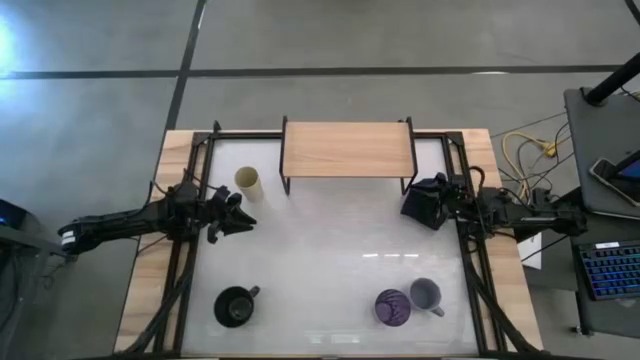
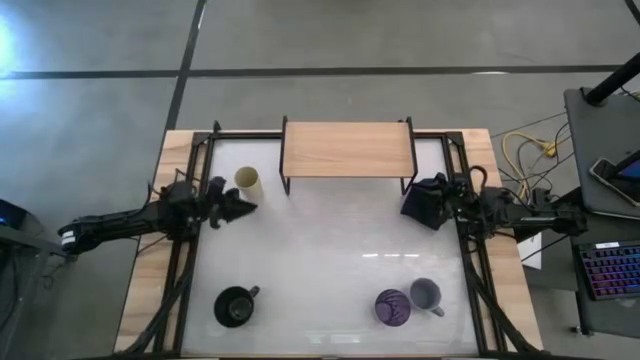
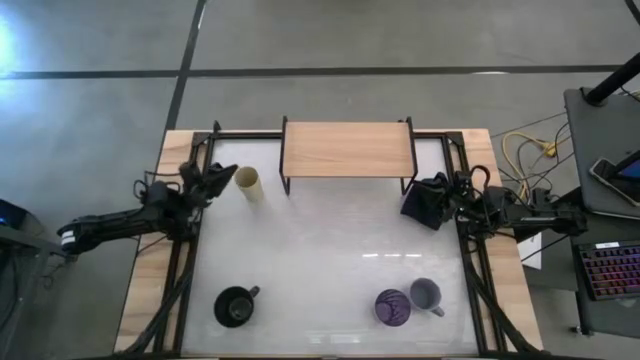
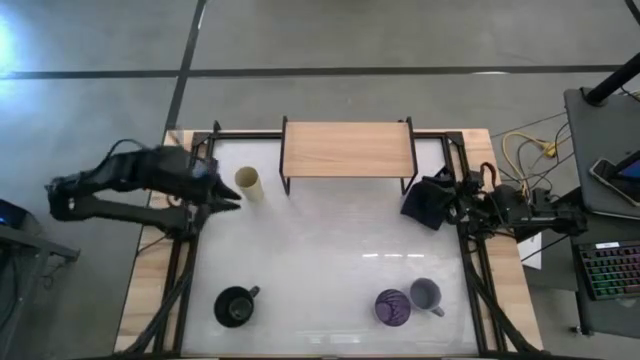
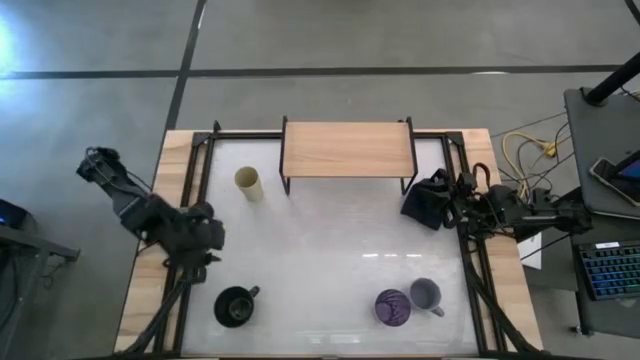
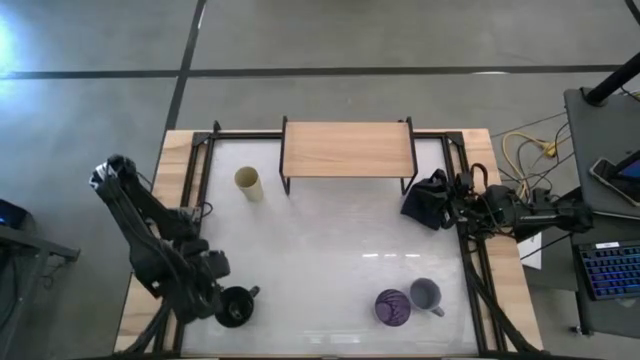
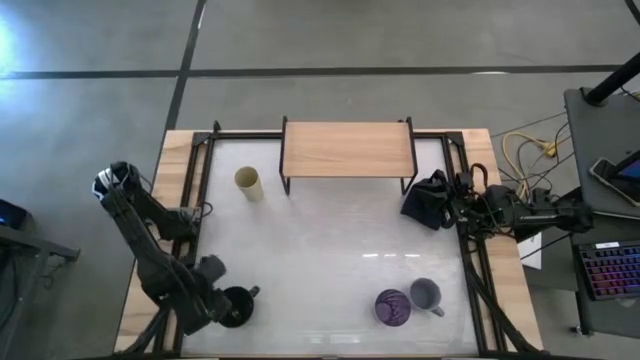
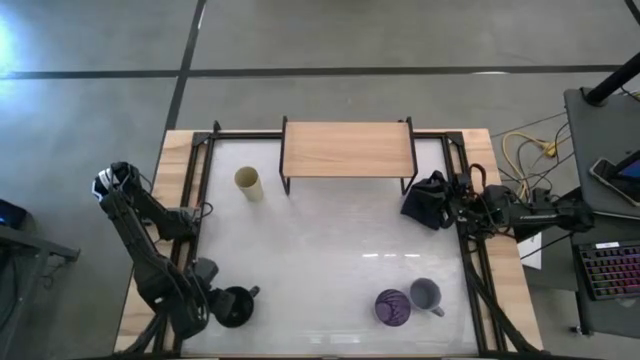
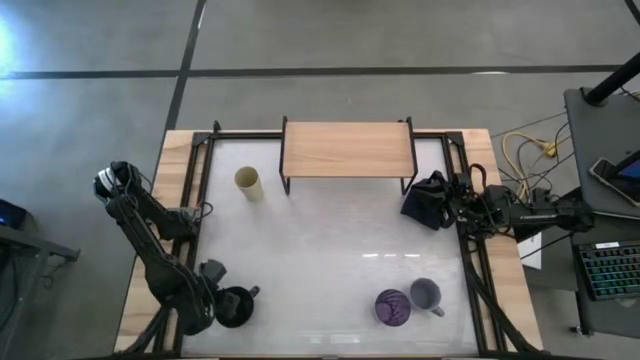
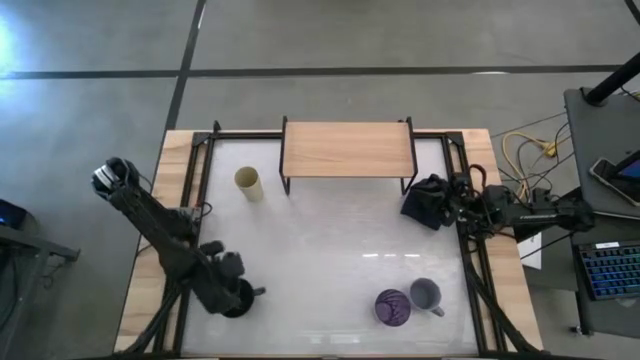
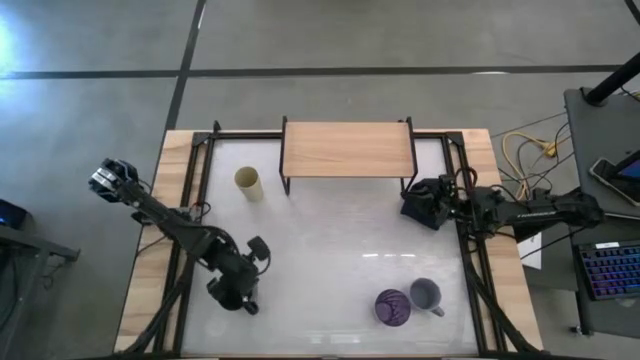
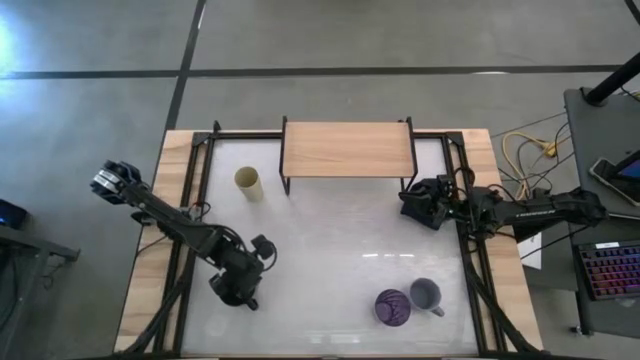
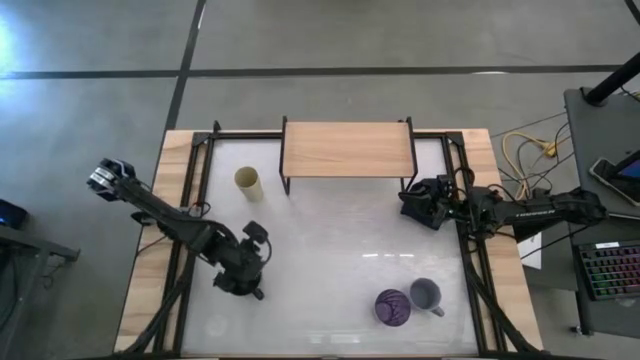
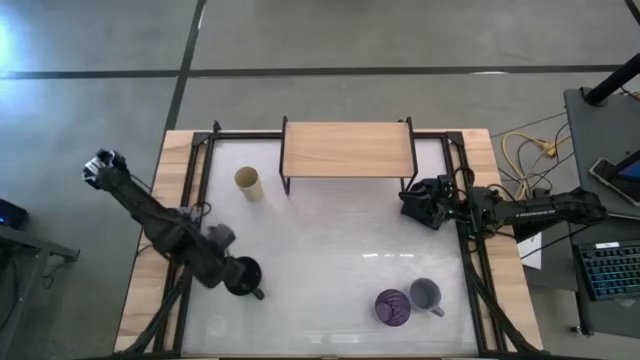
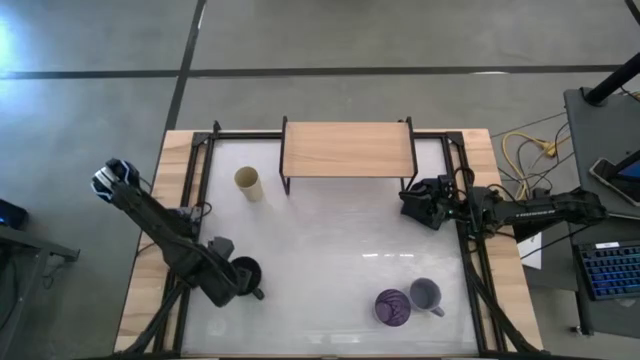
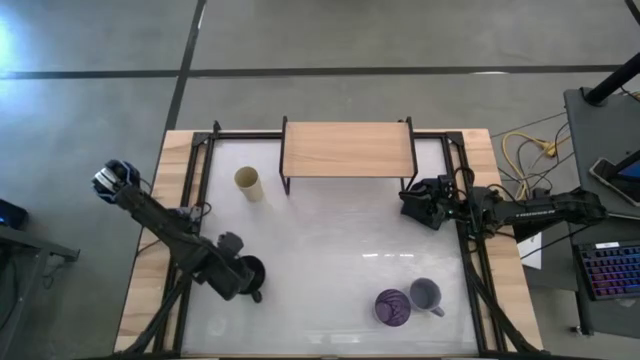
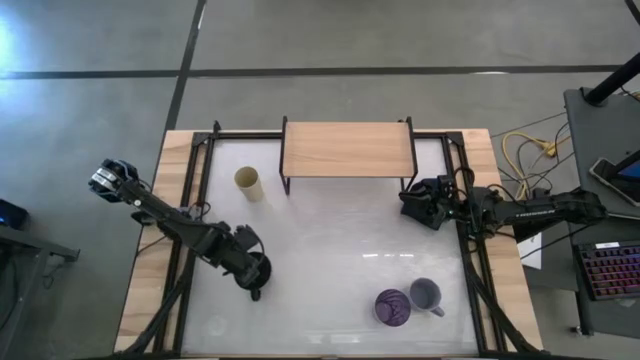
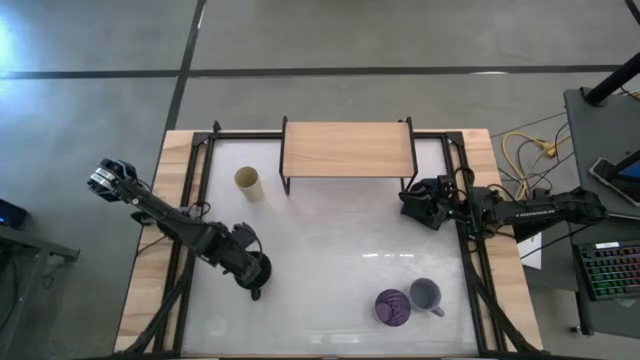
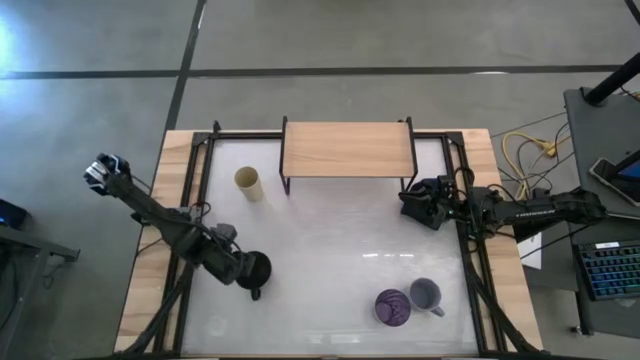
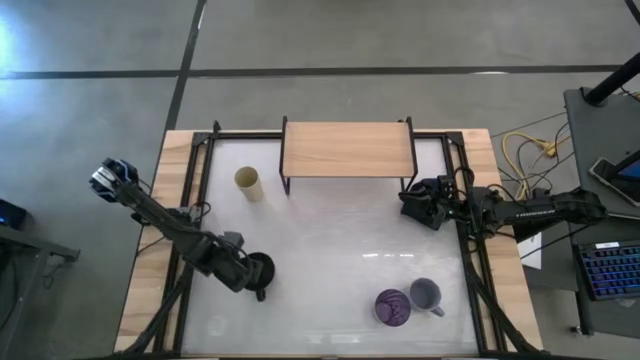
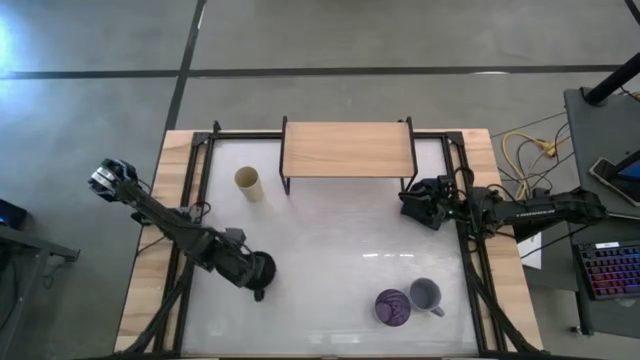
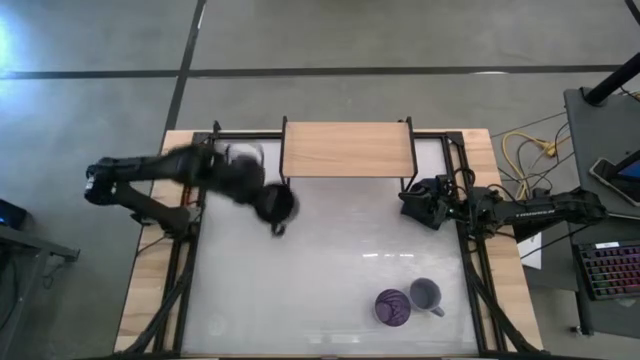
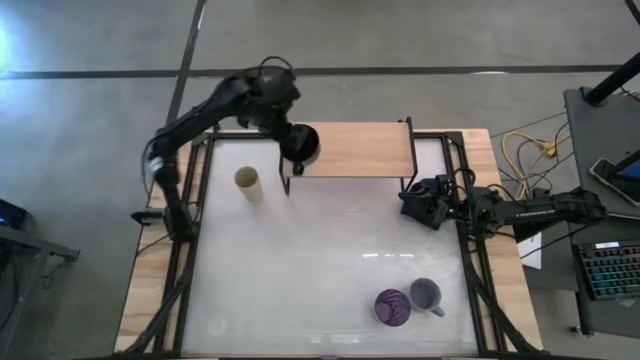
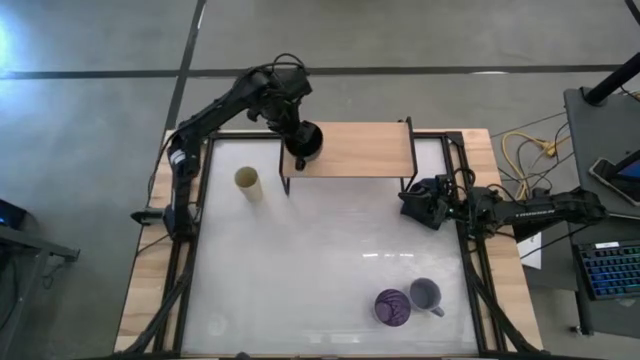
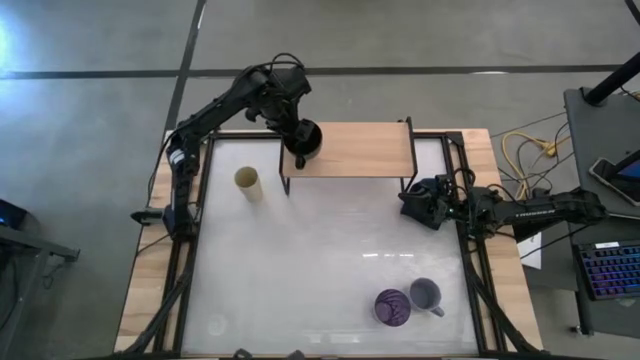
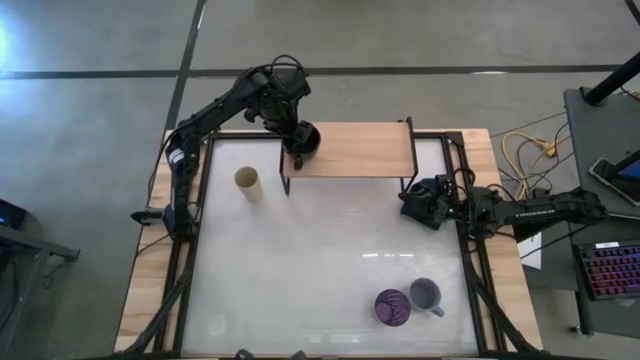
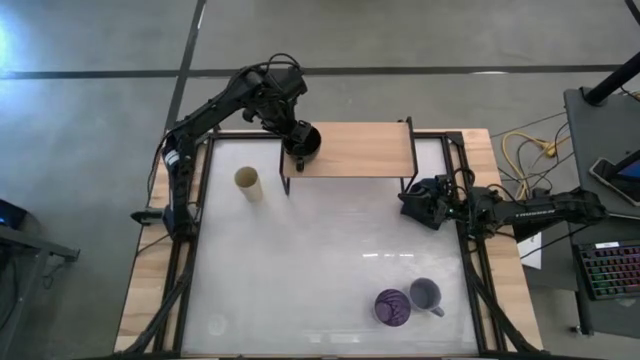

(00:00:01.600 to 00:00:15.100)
Task: Stack small to large cups/mugs on shelf
Put the black mug on the shelf

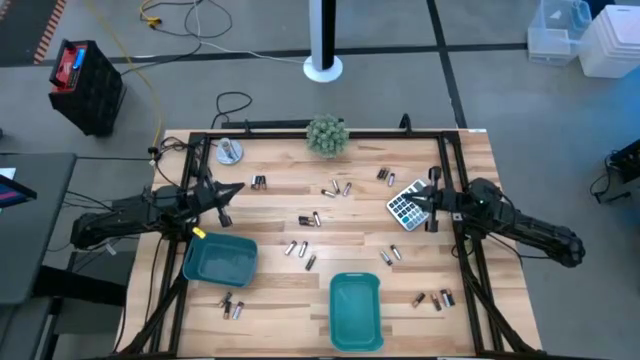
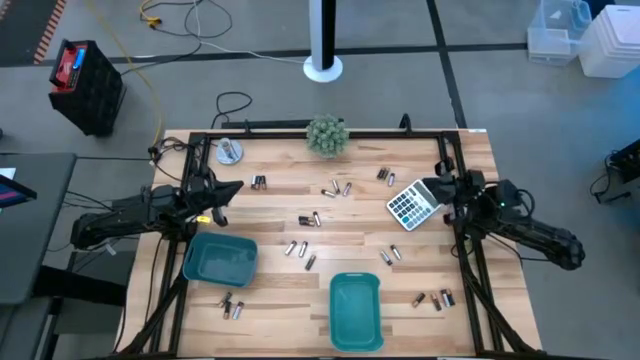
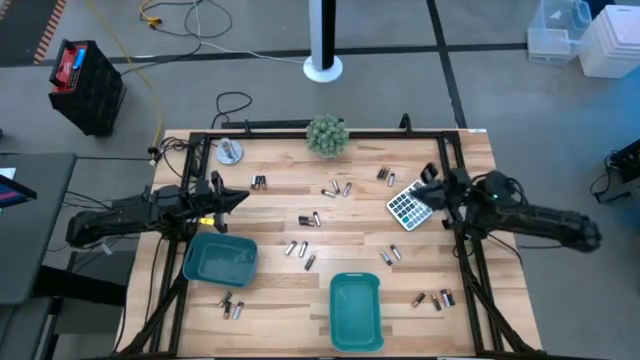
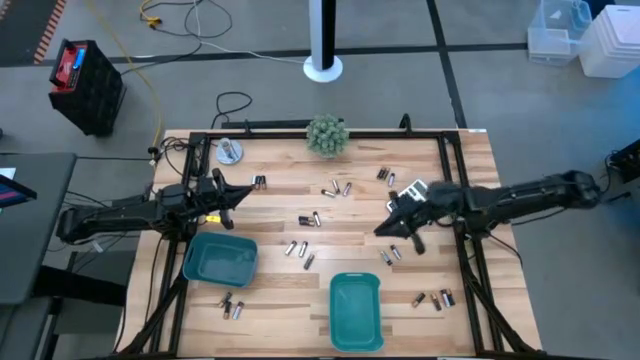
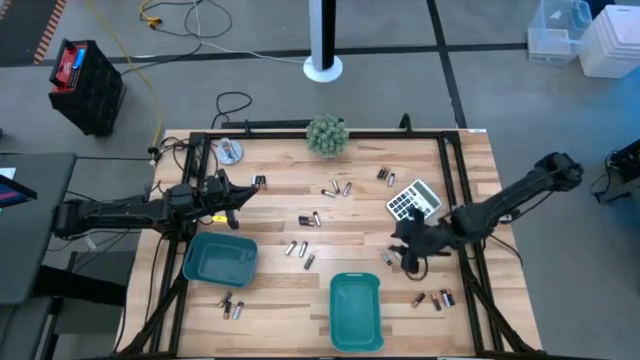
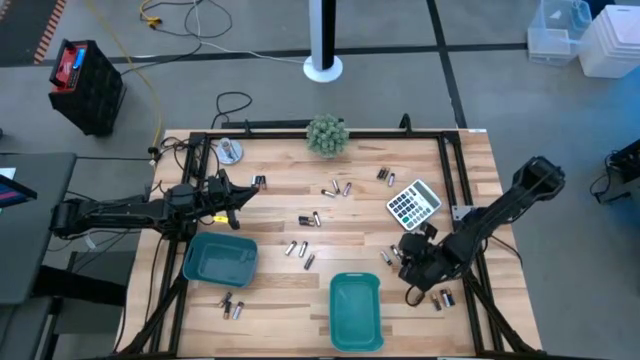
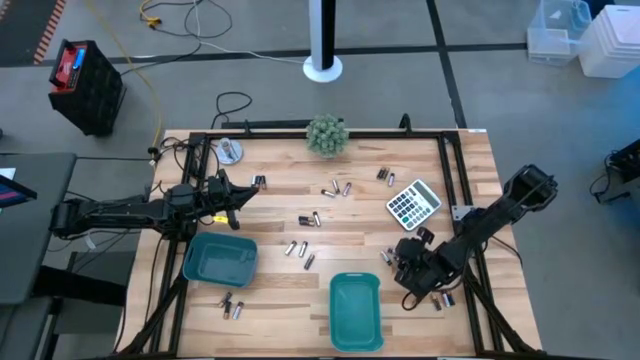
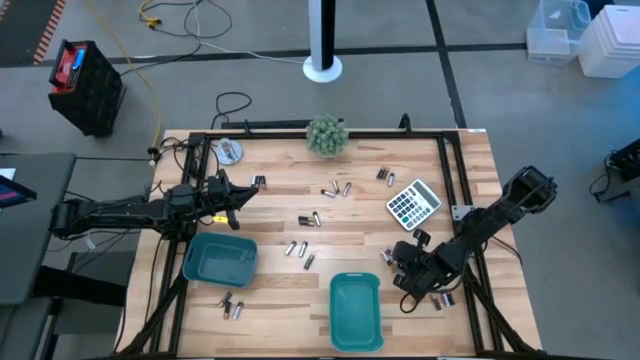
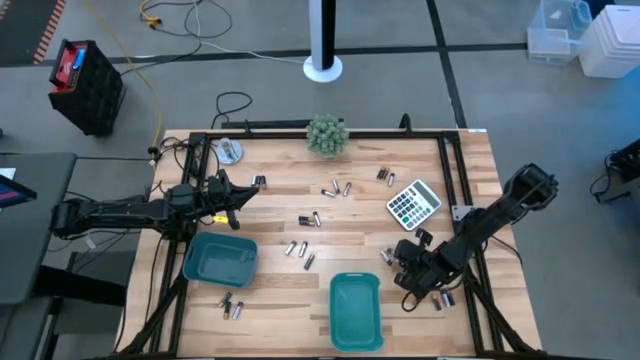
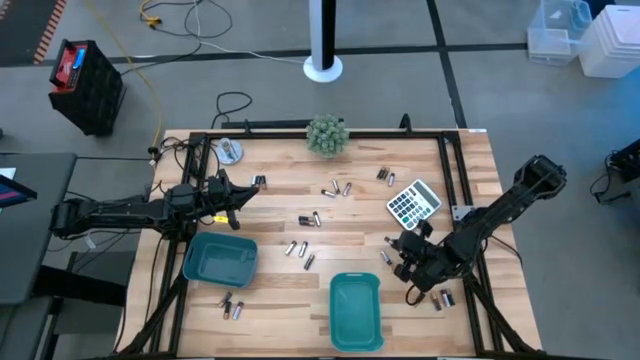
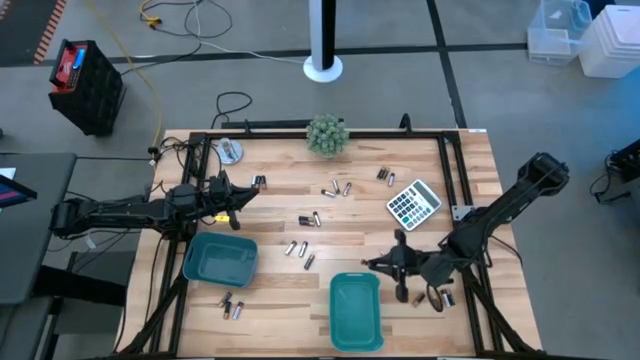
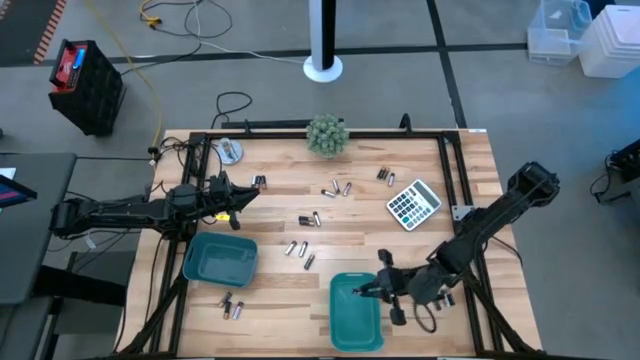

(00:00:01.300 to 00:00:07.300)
Task: Sort batteries
Put the silver battery into the green bin
